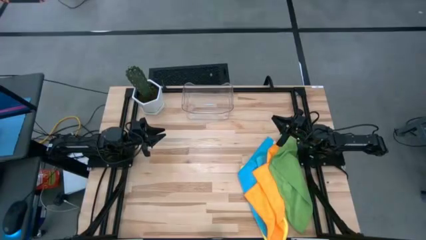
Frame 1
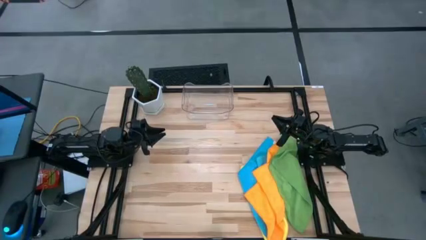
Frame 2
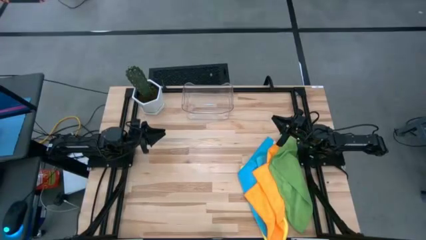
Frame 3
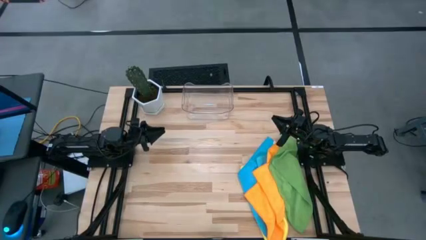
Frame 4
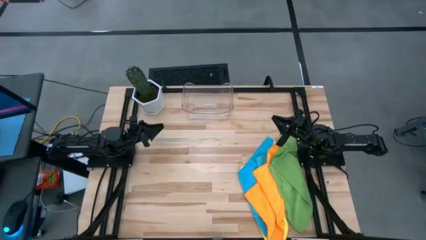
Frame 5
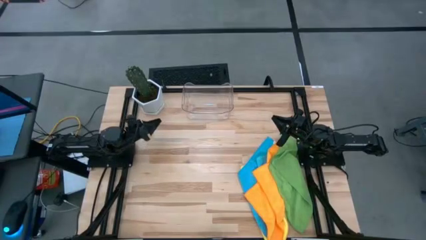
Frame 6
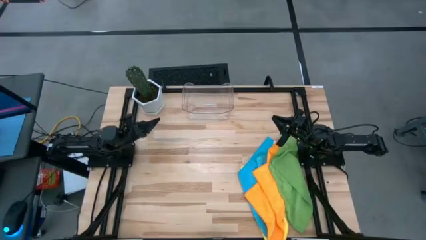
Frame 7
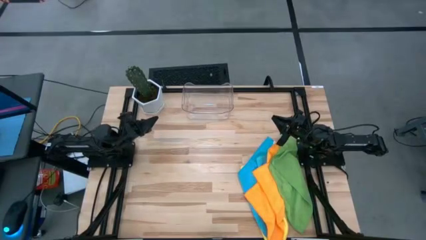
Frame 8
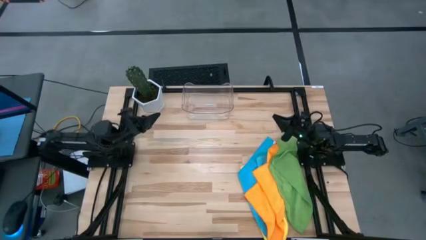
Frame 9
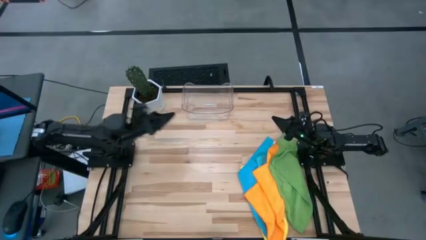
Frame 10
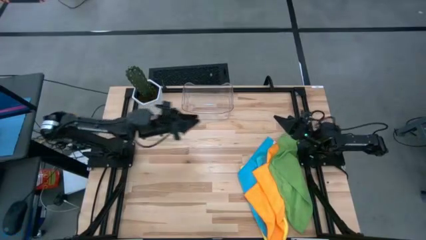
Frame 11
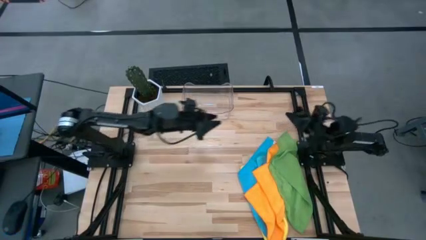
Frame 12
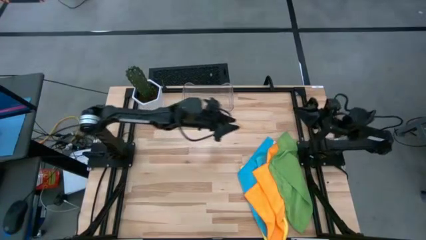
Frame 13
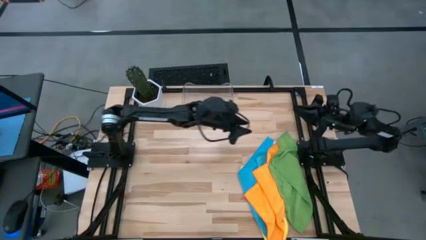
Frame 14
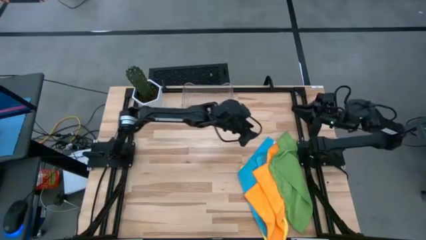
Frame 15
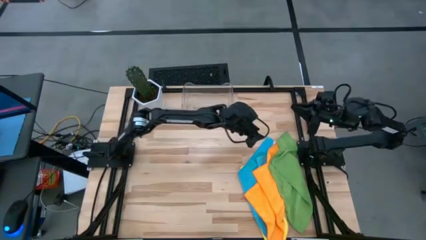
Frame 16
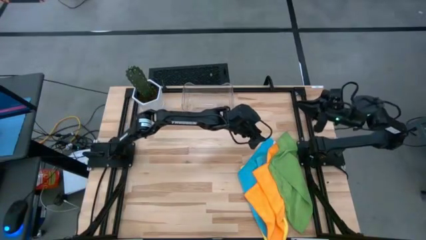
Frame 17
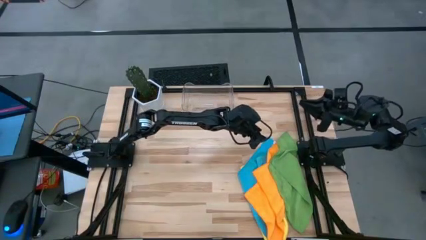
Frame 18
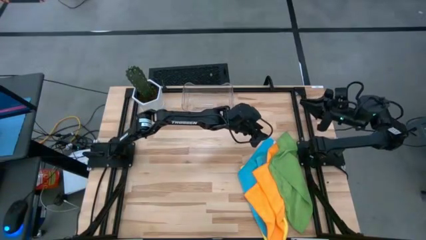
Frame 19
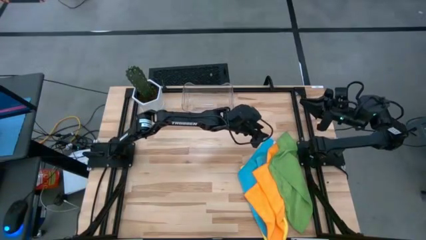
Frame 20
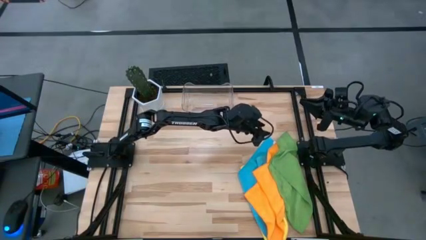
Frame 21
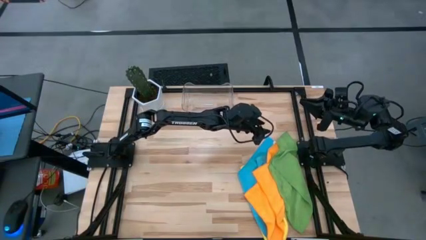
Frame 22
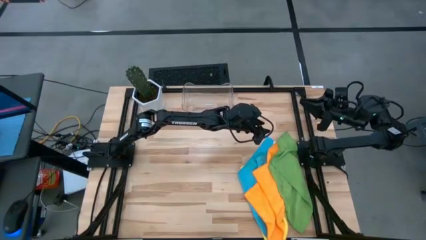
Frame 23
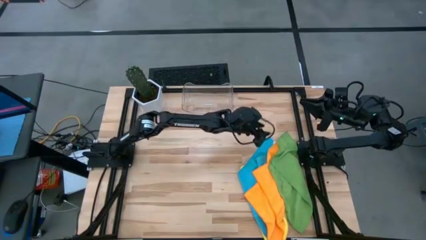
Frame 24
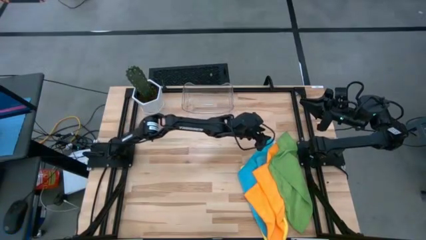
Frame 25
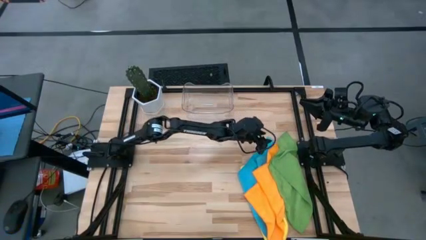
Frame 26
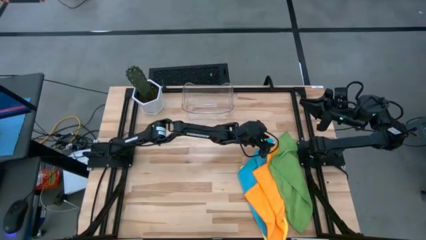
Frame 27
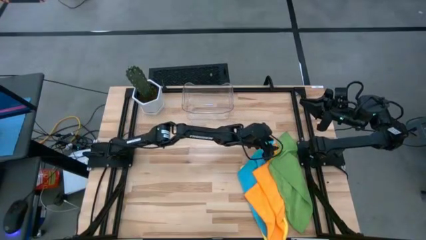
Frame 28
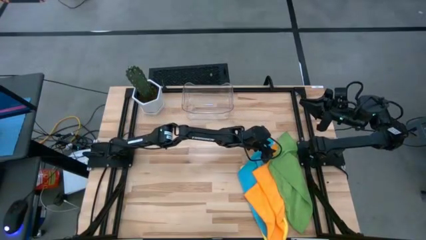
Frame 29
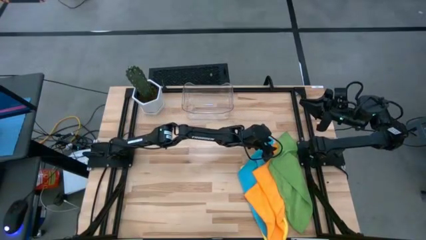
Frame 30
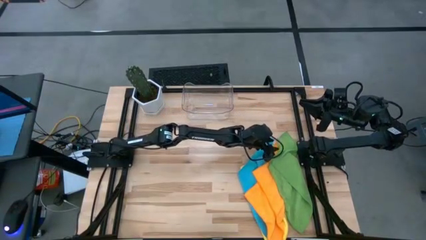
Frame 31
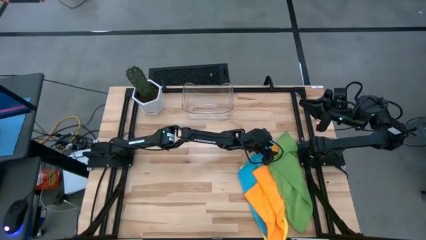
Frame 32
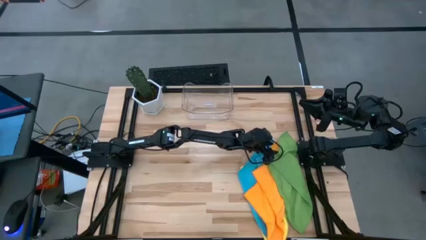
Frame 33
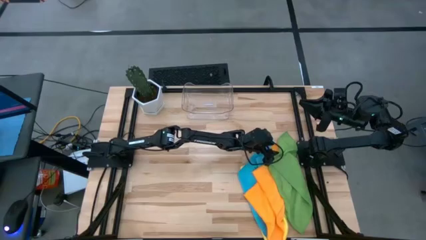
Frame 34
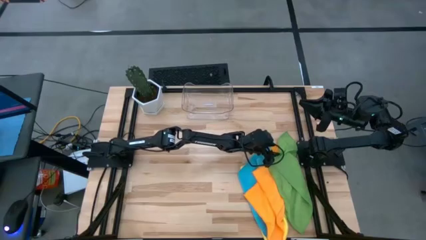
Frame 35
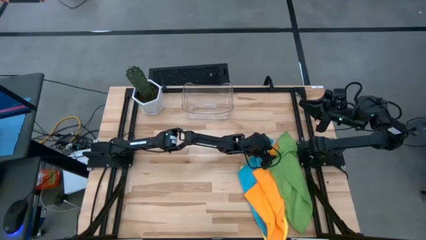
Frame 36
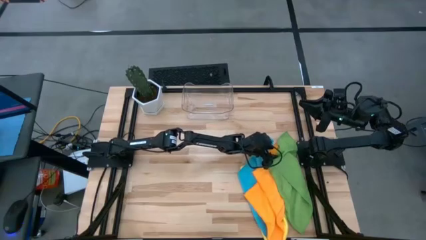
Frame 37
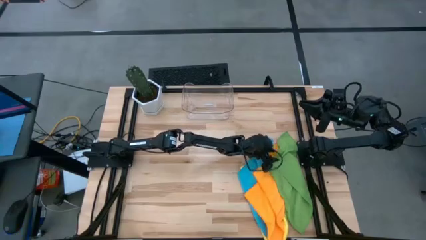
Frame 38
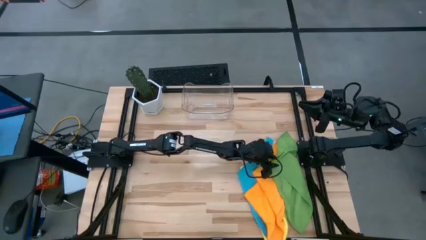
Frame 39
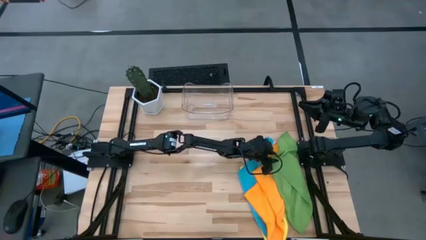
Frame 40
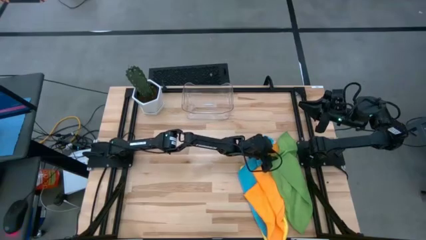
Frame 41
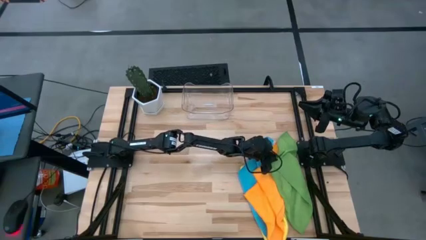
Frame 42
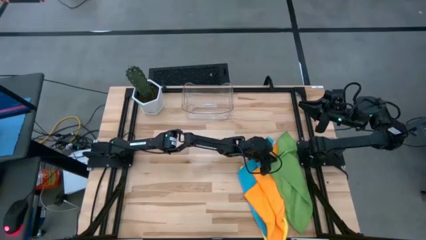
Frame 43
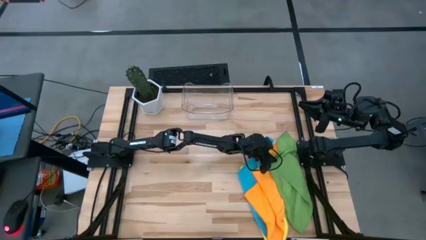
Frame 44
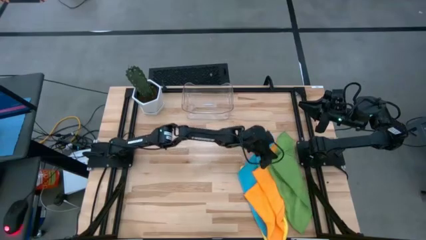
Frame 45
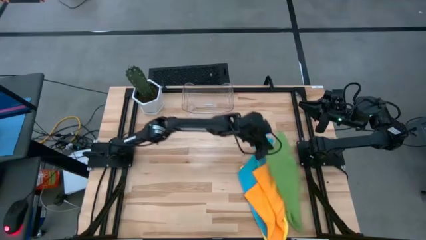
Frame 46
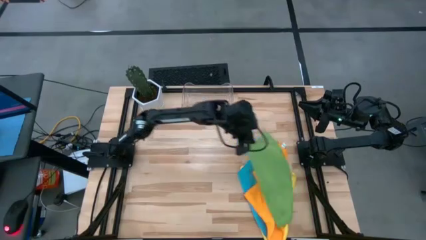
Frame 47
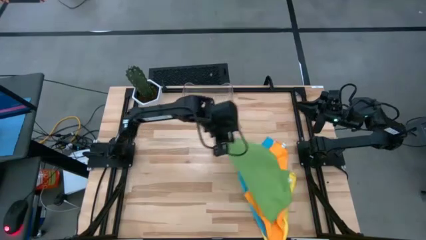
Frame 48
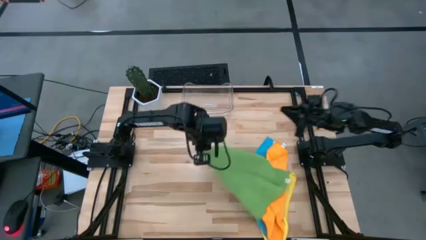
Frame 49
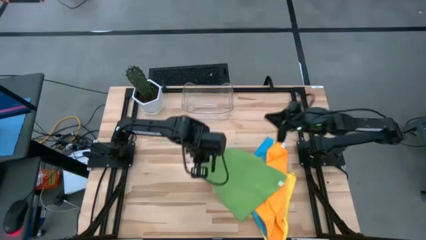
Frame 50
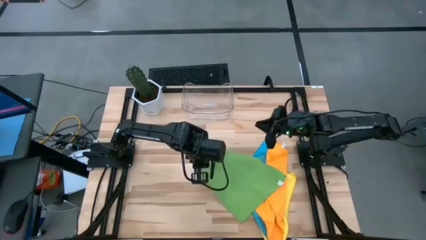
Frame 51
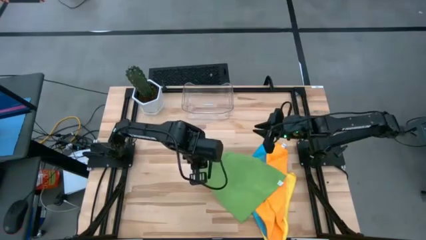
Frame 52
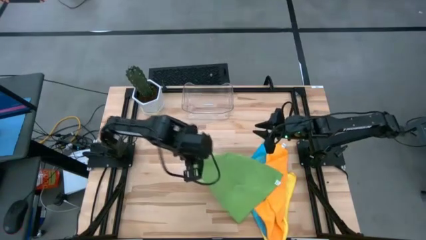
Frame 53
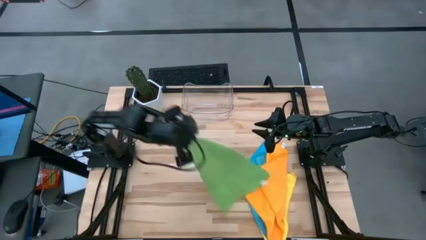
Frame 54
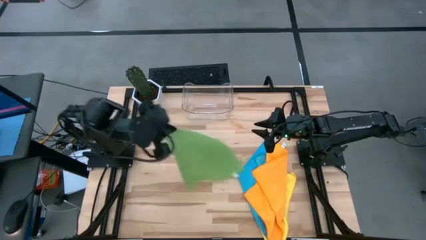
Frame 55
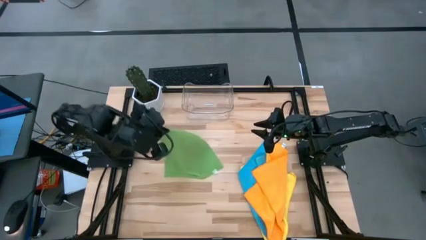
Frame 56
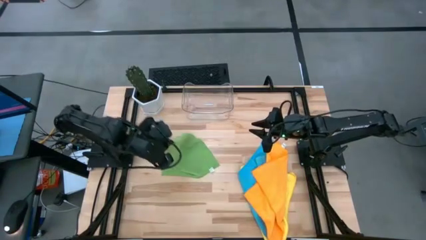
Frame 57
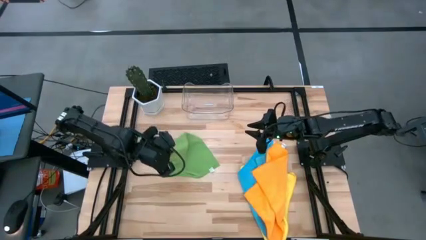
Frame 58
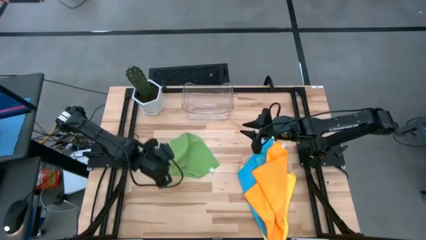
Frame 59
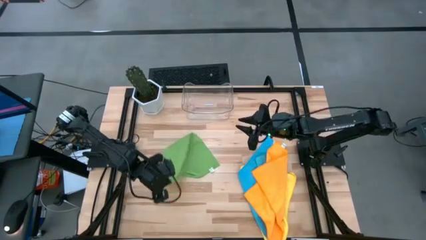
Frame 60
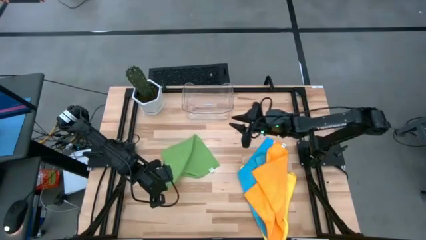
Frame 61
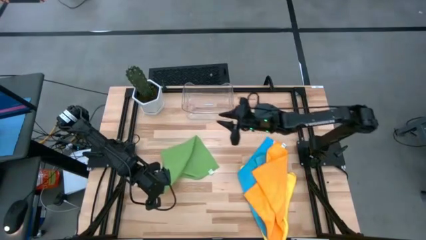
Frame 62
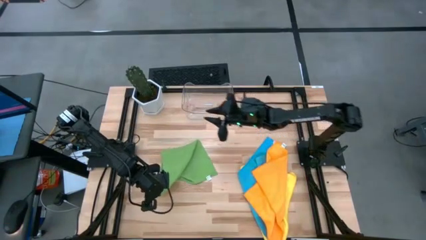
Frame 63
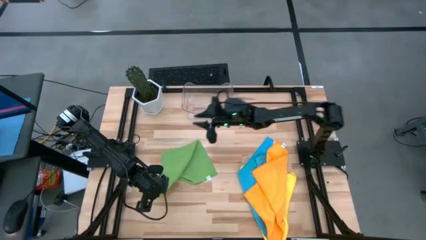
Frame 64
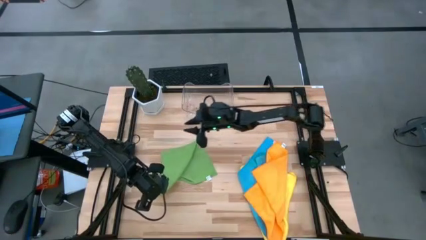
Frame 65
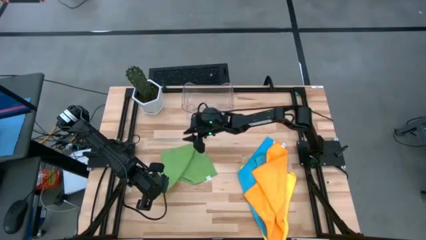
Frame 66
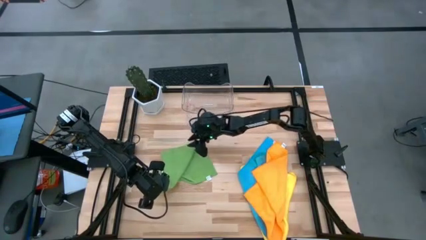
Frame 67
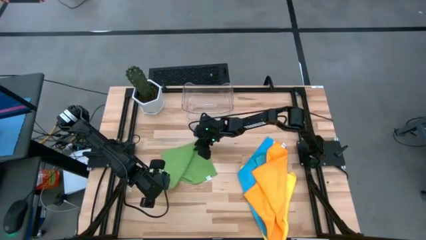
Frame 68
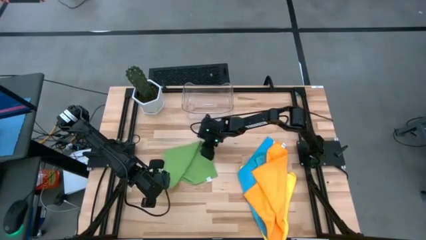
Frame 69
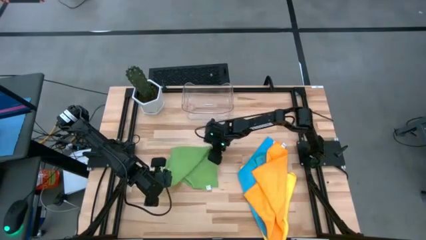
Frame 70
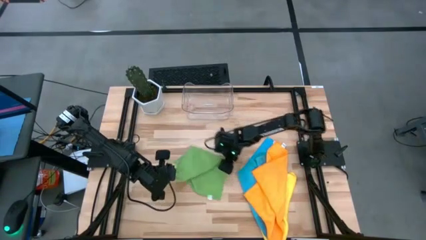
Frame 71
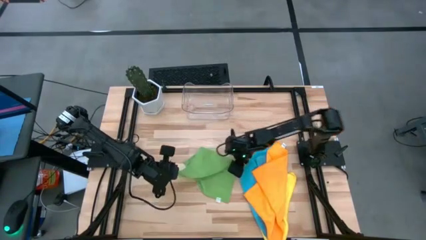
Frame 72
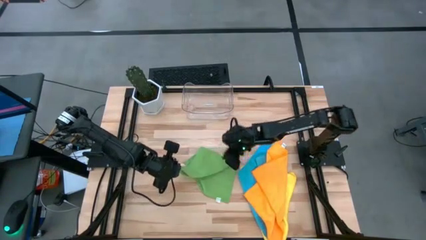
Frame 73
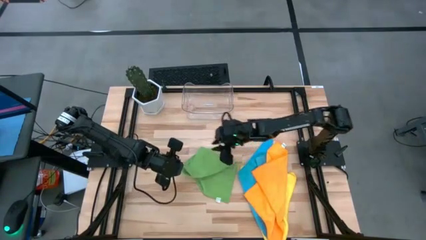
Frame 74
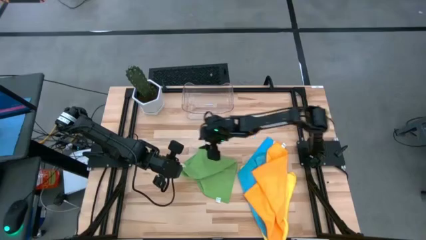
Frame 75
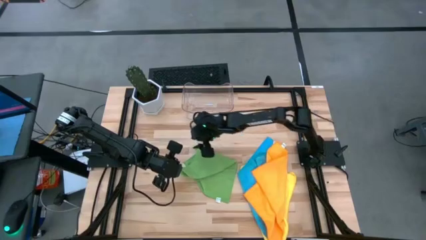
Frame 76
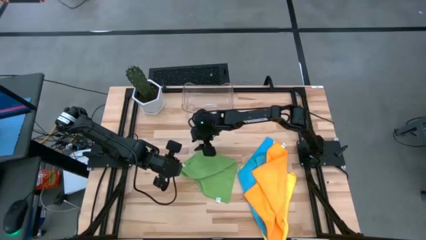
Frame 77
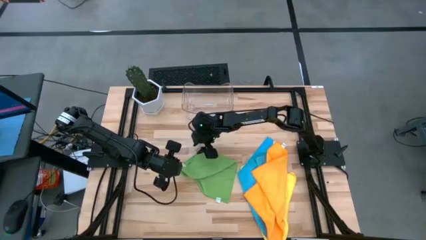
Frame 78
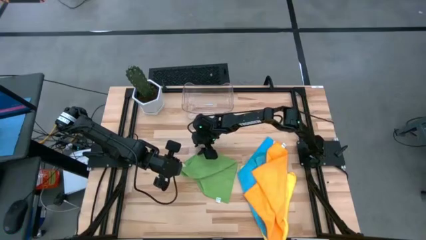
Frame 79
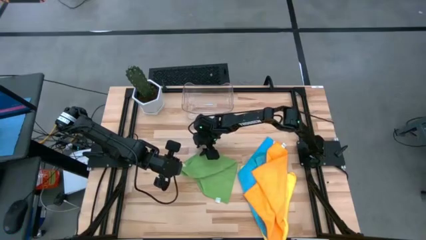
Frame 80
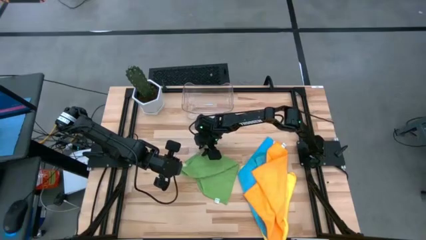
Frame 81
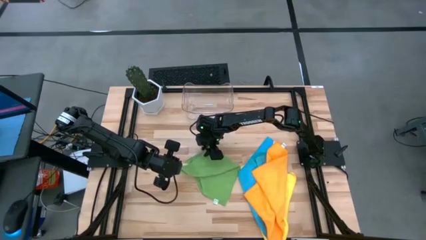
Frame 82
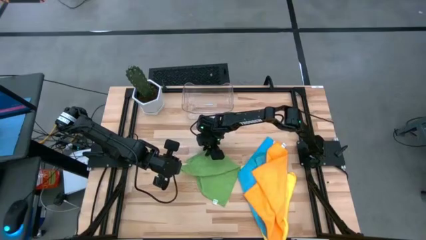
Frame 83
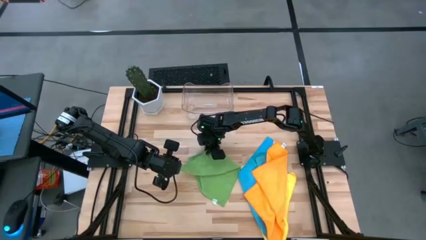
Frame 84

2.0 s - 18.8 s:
Task: Fold microfiber towels
Fold the green towel
